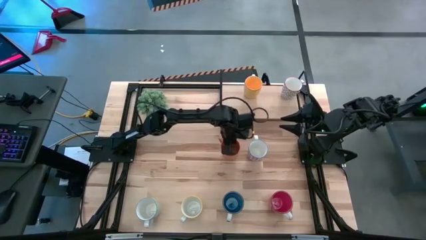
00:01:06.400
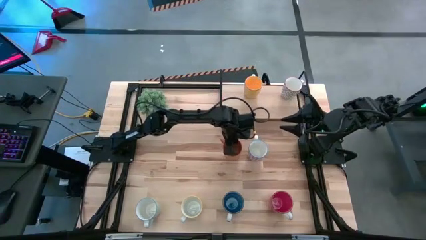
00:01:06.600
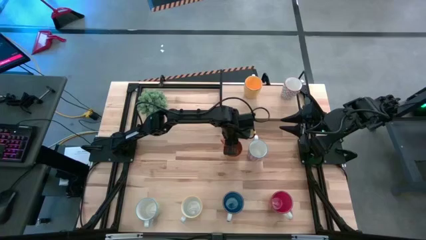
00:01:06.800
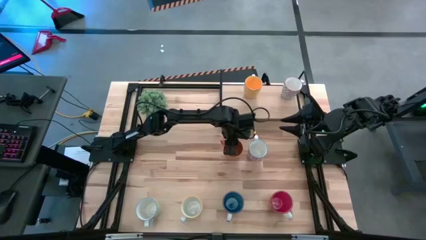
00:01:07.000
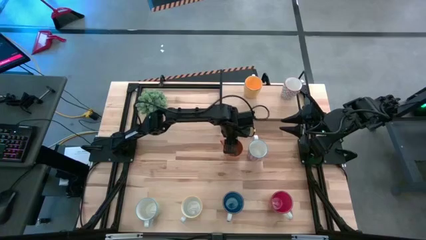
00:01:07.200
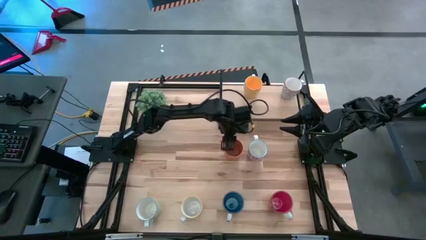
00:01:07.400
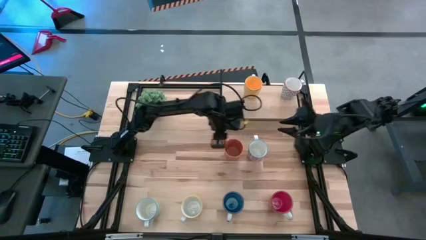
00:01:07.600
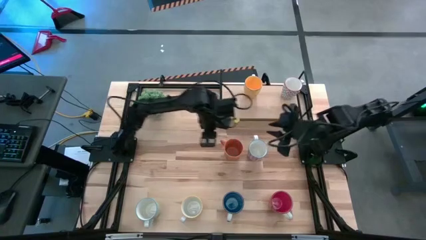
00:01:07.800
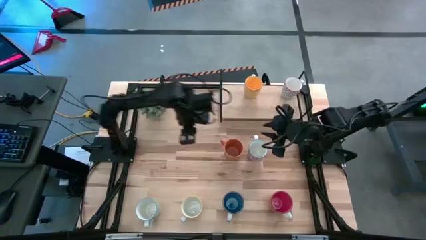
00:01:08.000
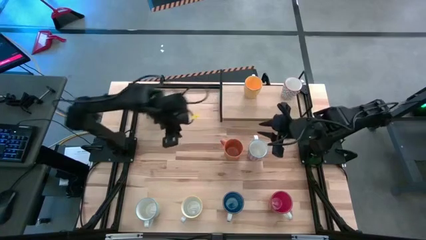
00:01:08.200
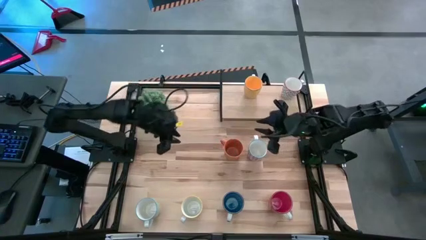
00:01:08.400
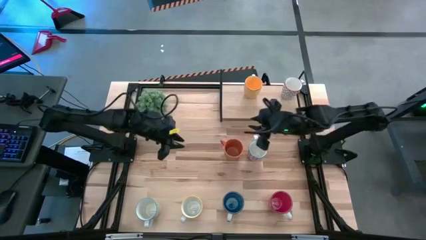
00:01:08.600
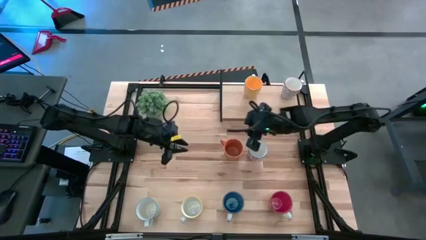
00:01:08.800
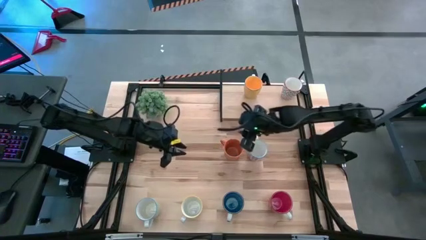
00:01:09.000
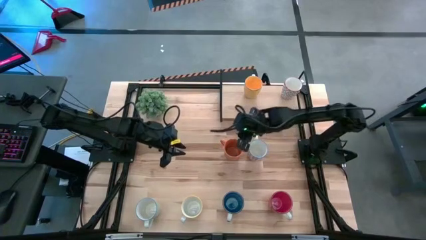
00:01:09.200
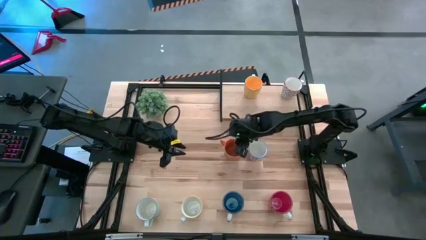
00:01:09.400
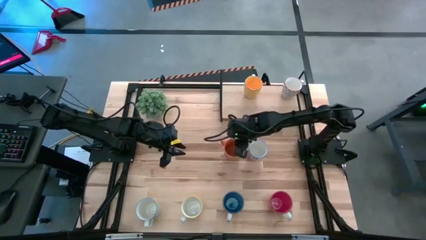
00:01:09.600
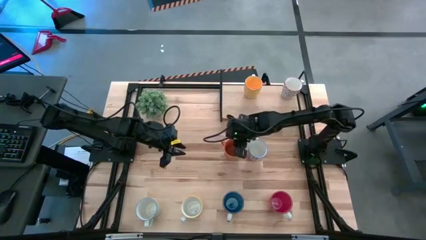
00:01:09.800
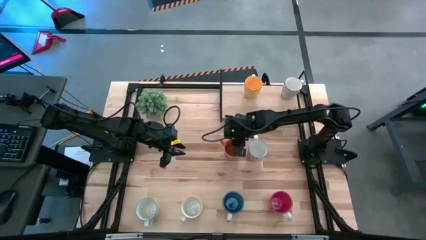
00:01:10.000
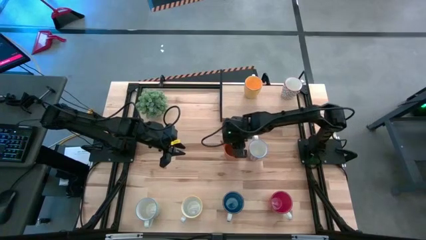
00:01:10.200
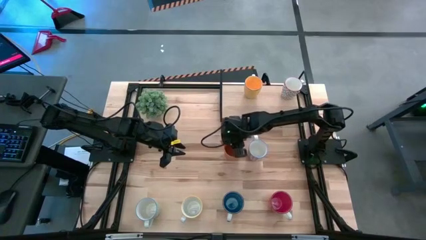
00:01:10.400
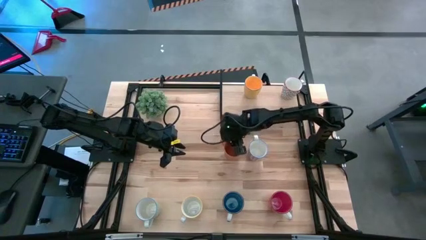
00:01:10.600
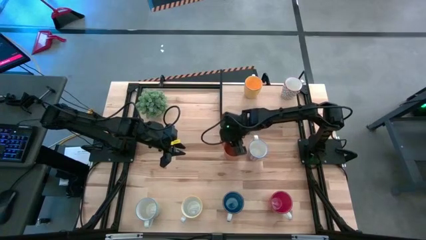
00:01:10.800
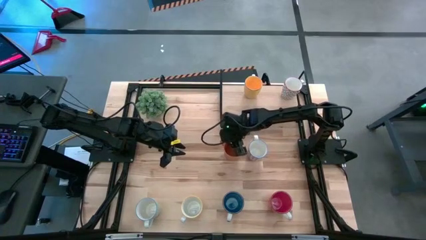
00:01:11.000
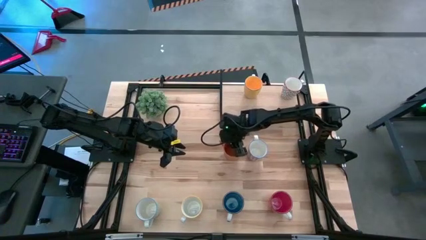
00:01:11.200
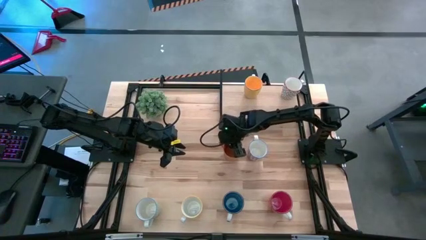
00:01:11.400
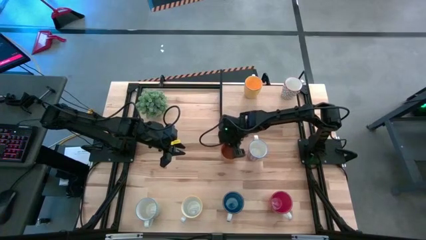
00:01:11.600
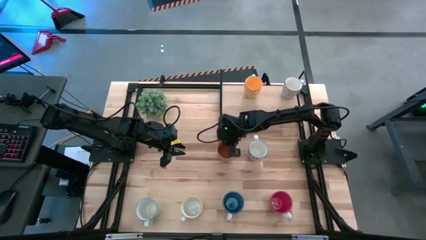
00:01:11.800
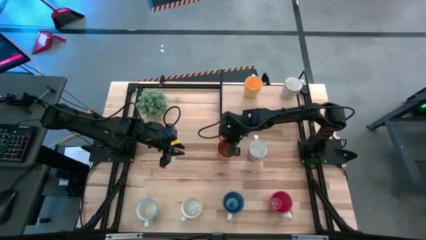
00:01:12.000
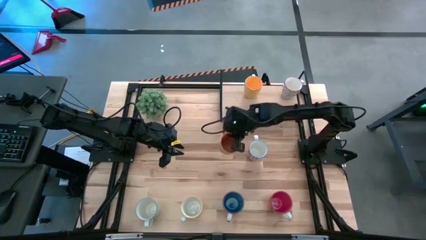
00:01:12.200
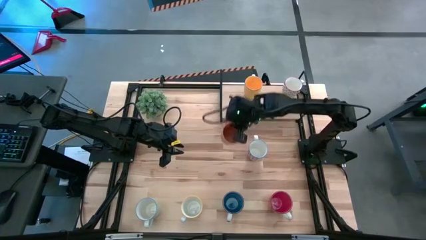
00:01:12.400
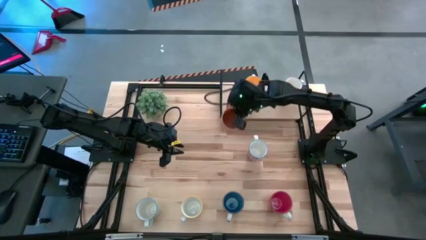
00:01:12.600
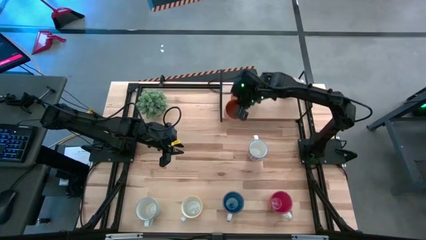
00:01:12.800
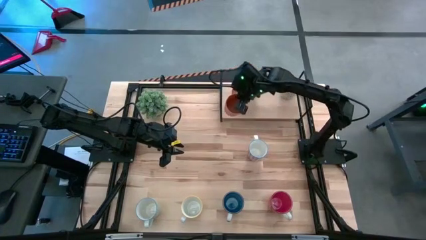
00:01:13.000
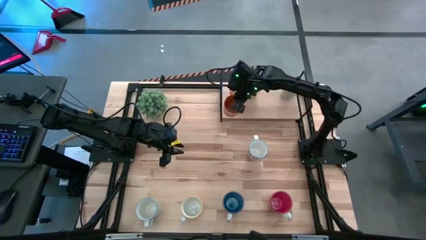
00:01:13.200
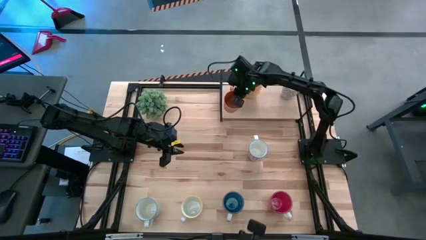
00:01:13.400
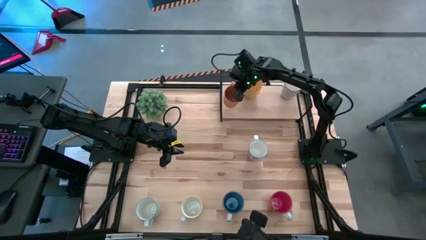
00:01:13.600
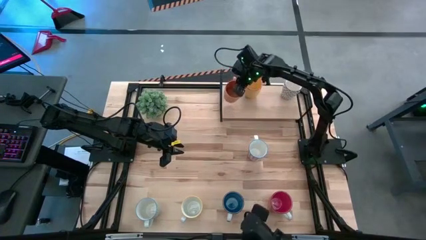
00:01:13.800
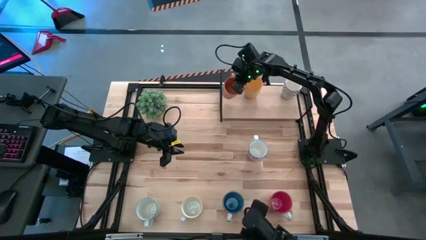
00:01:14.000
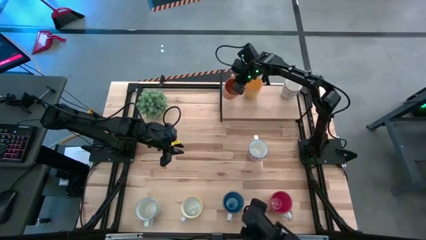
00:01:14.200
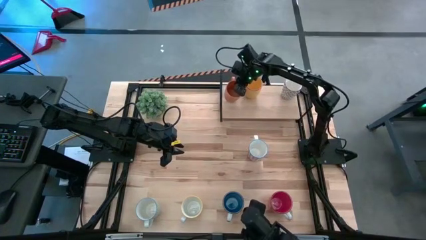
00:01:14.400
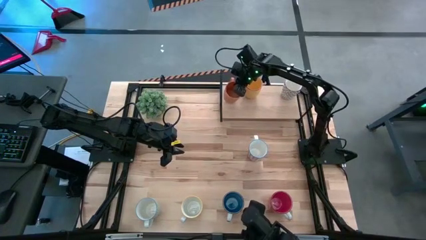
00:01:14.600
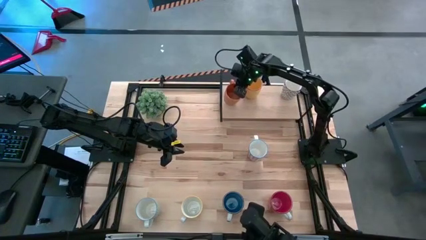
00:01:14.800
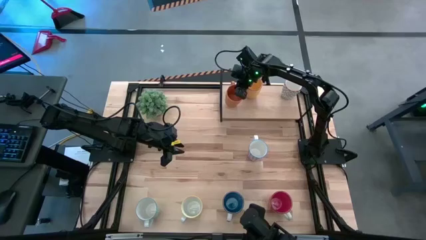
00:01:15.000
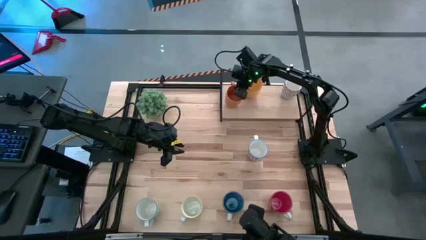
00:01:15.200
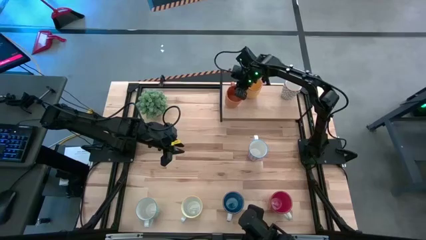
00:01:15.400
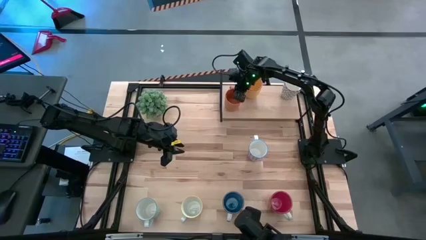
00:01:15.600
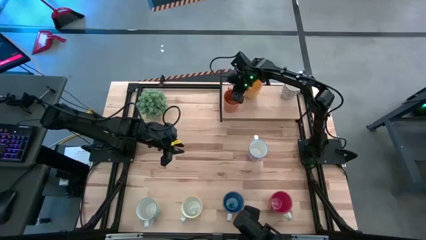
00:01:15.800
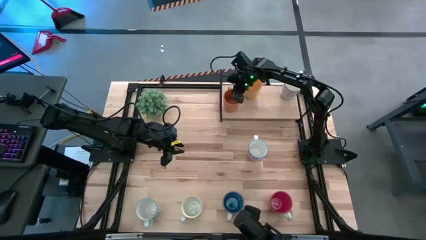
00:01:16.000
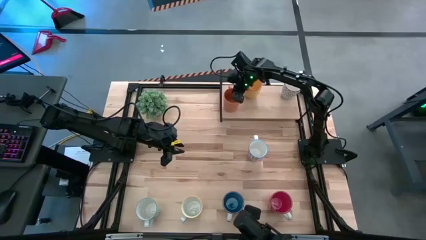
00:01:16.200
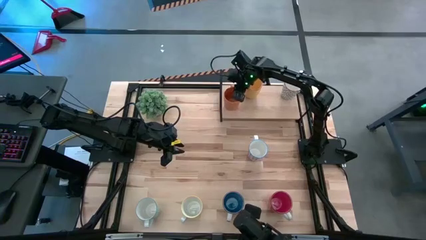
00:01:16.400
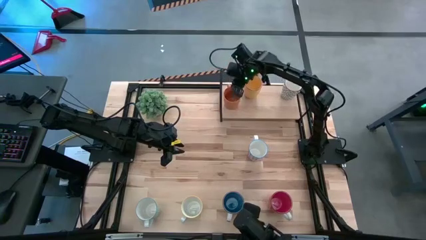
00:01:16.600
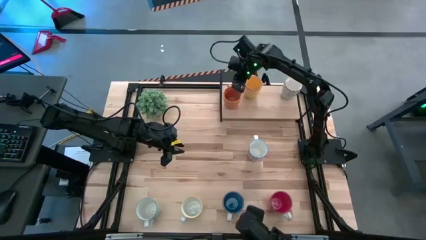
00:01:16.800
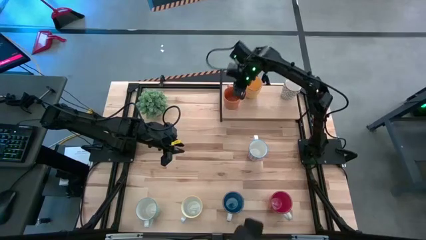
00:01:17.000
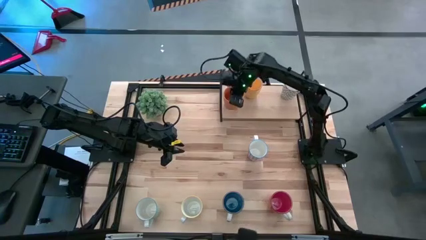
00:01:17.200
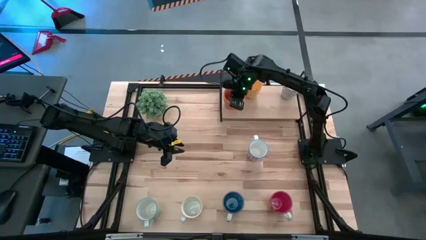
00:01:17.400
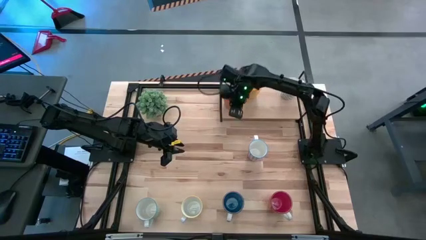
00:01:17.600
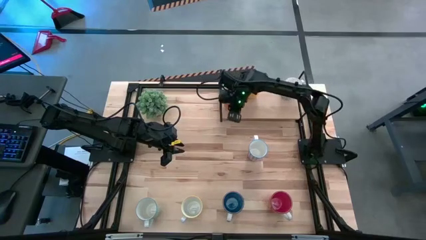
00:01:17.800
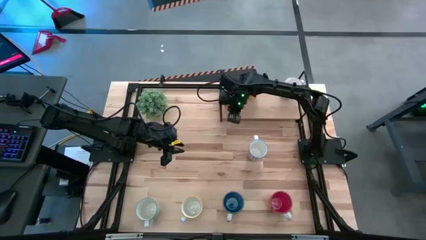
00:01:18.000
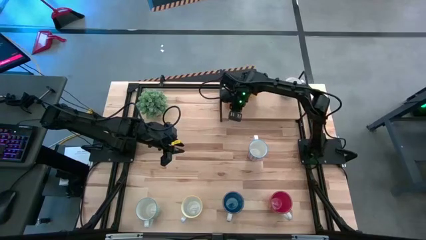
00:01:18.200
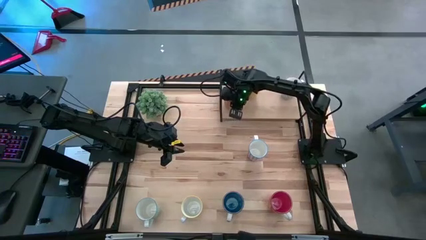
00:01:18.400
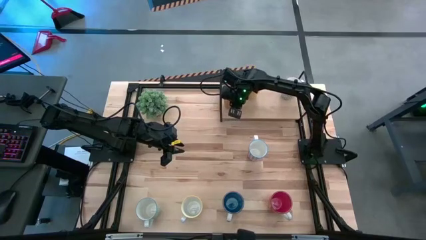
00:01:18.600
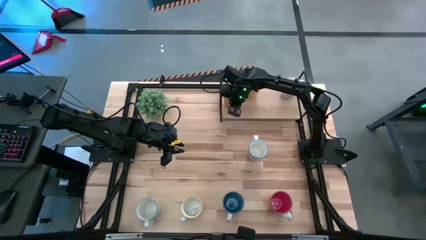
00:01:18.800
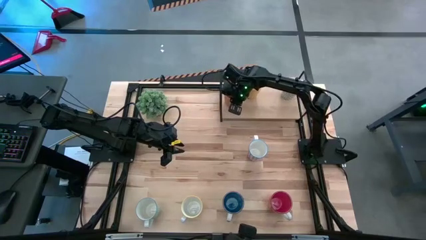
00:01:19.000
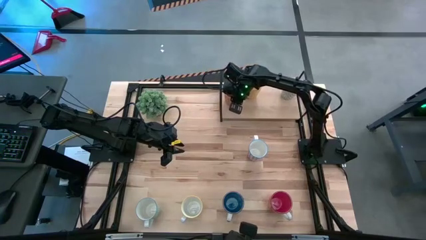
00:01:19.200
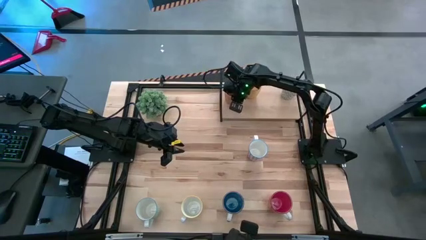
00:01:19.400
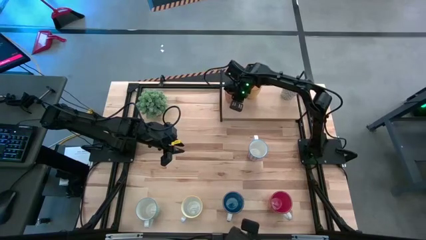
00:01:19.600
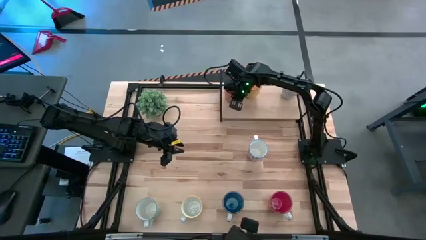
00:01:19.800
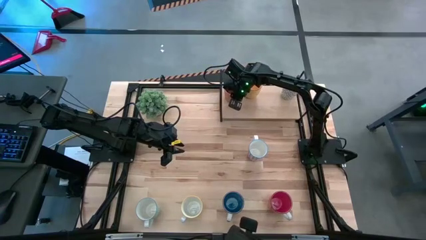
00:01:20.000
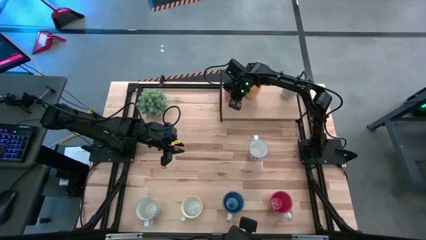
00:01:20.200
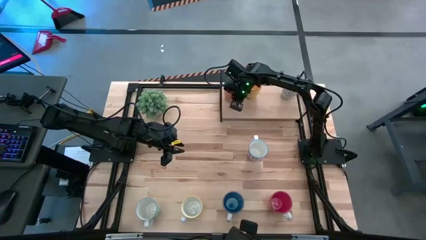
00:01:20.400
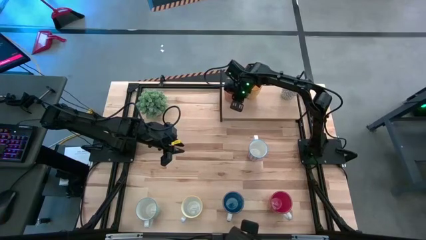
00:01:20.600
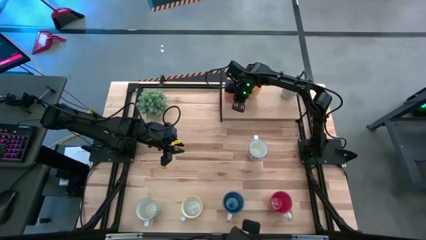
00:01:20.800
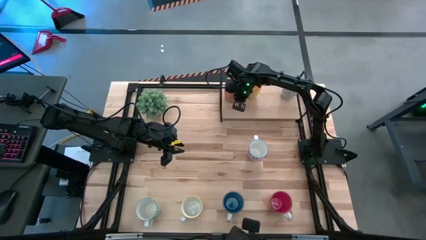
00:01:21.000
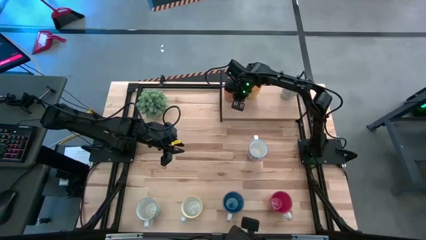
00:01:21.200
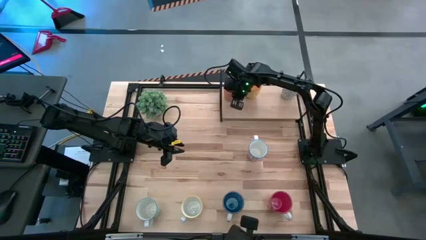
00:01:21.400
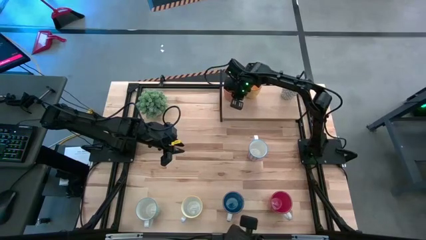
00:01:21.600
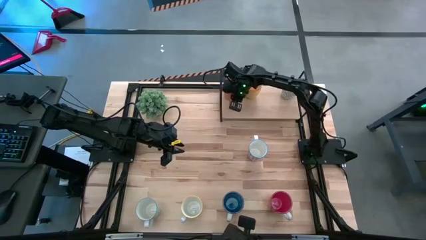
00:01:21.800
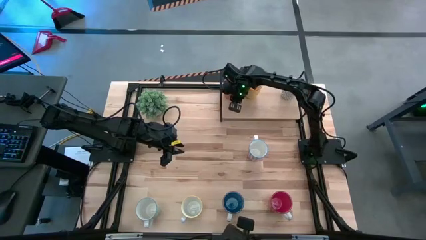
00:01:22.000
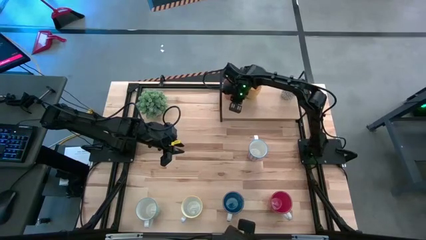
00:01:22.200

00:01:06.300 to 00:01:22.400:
Task: Place coffee mugs
Put the orange mug on the shelf
